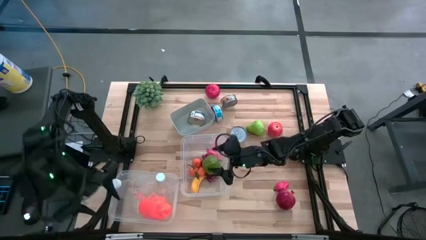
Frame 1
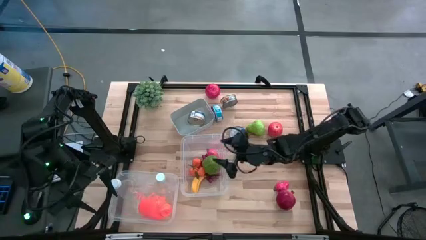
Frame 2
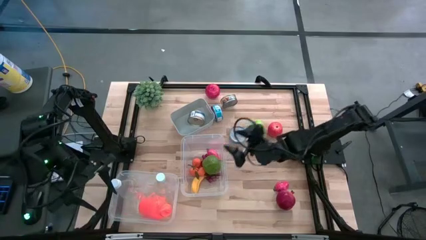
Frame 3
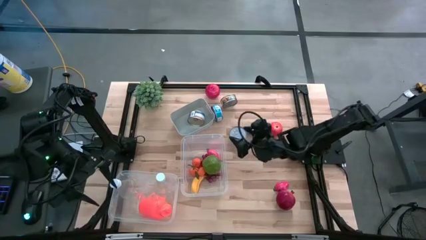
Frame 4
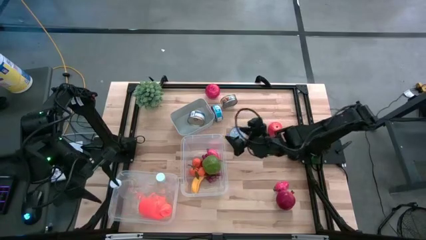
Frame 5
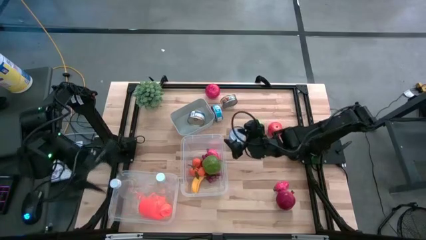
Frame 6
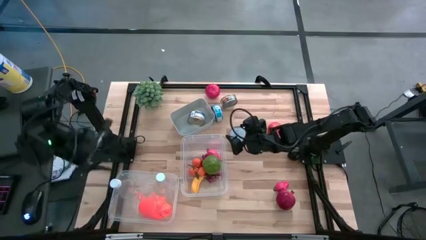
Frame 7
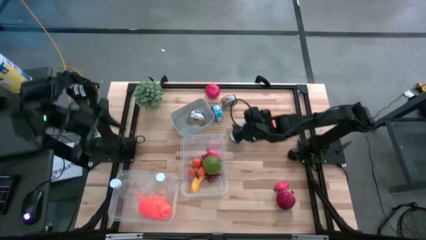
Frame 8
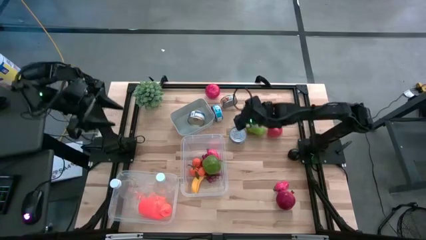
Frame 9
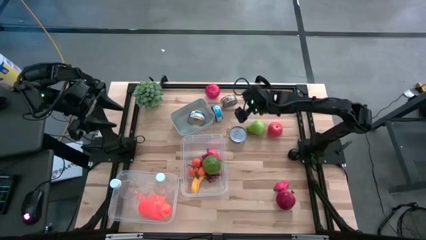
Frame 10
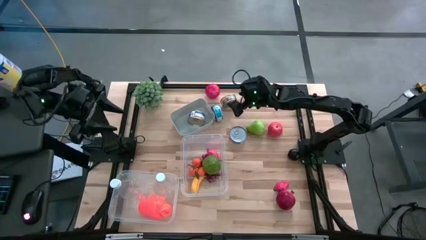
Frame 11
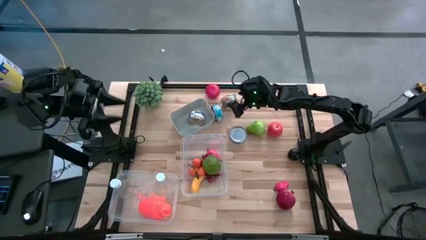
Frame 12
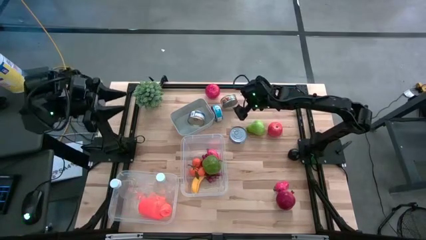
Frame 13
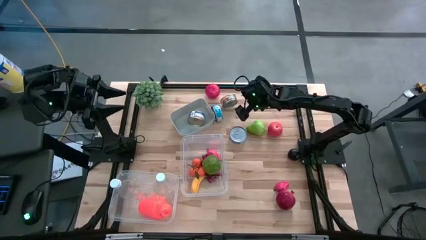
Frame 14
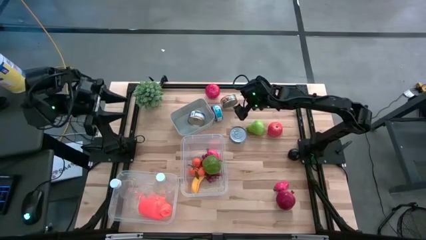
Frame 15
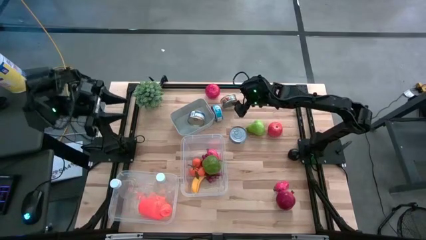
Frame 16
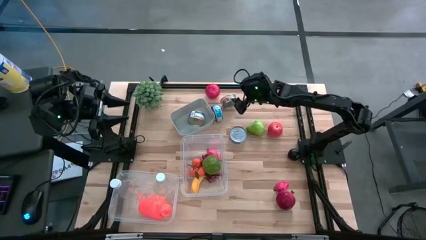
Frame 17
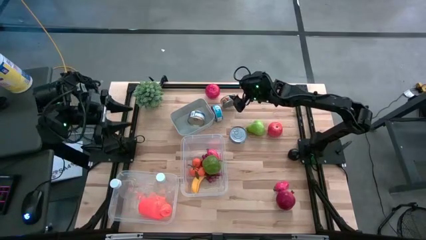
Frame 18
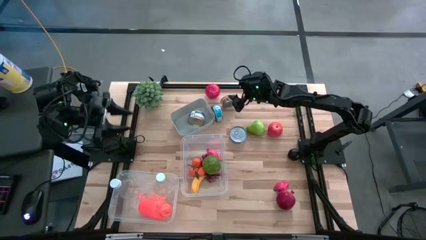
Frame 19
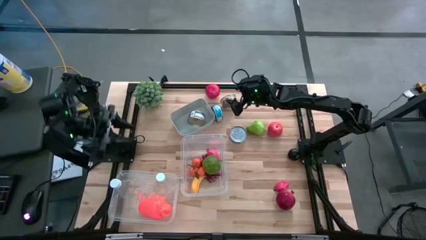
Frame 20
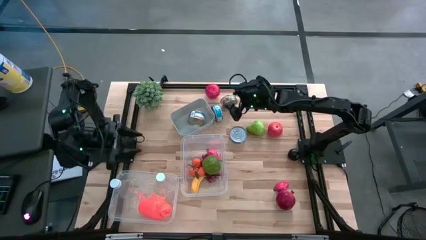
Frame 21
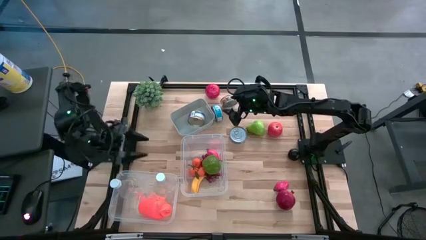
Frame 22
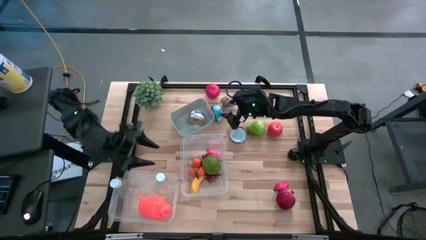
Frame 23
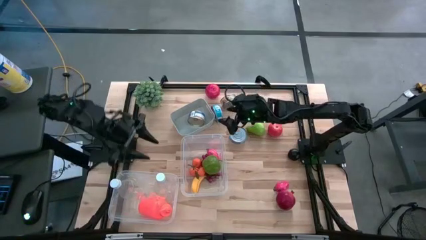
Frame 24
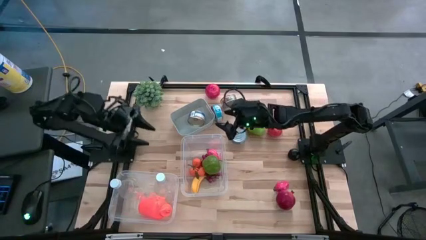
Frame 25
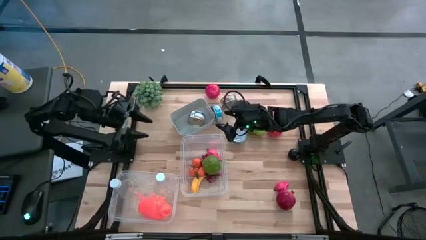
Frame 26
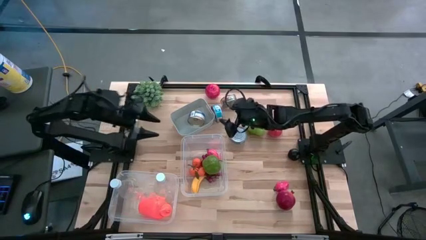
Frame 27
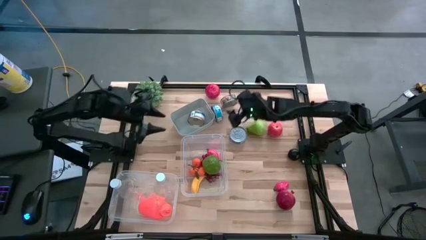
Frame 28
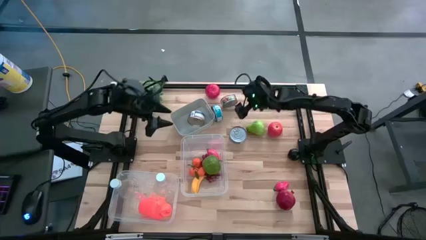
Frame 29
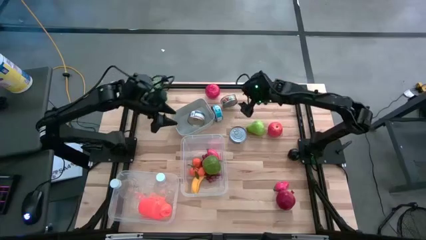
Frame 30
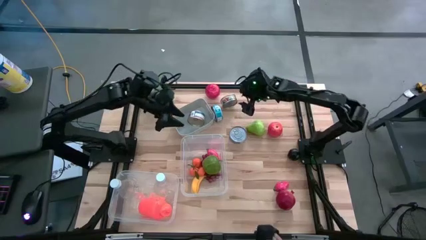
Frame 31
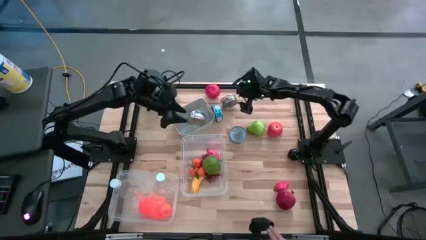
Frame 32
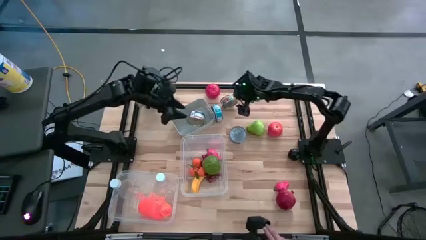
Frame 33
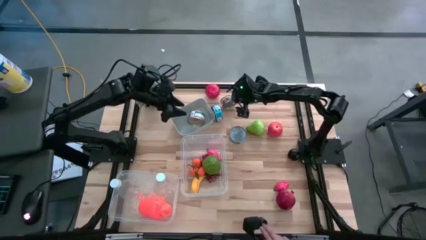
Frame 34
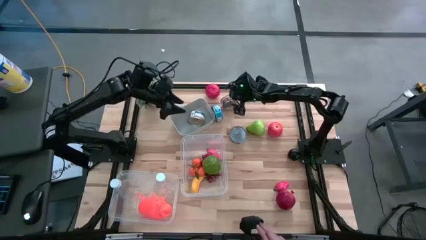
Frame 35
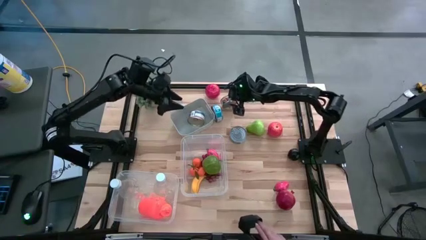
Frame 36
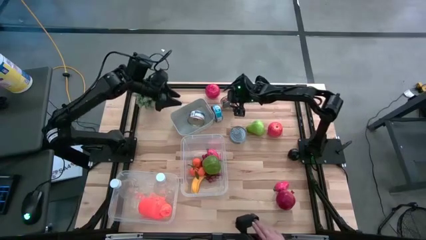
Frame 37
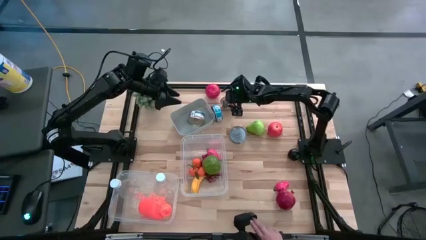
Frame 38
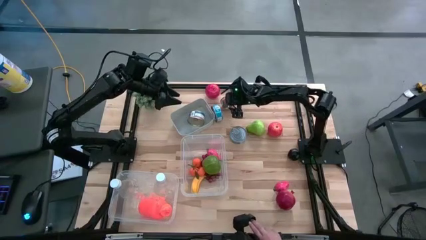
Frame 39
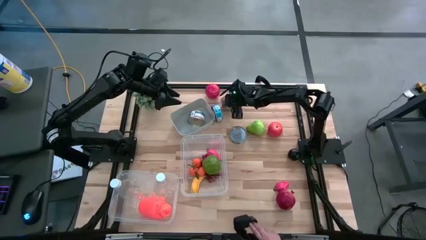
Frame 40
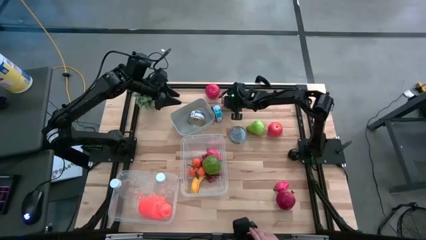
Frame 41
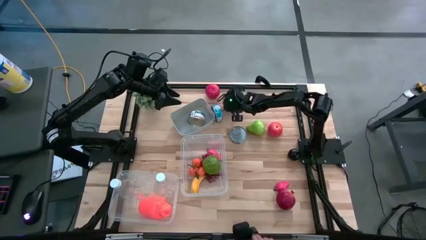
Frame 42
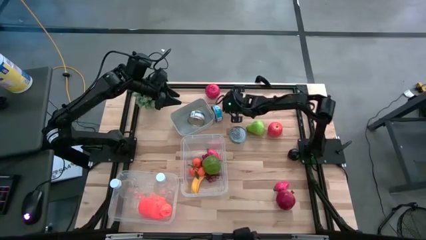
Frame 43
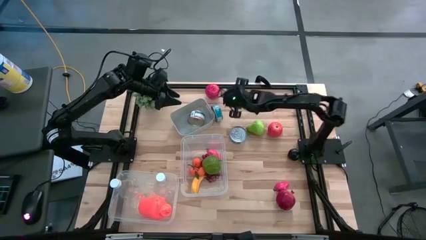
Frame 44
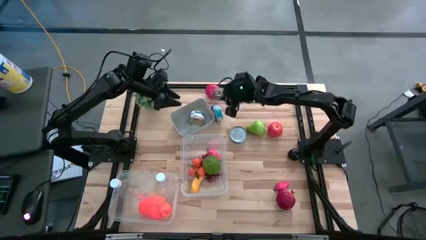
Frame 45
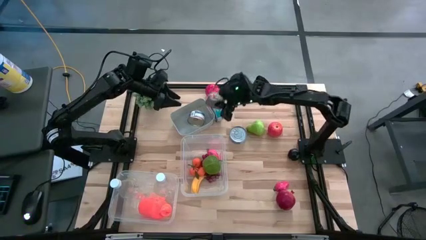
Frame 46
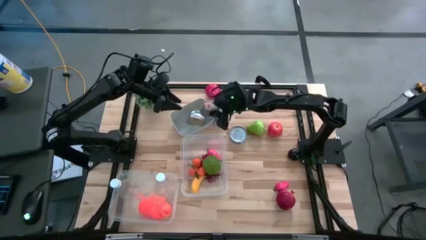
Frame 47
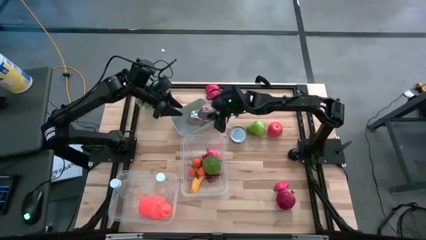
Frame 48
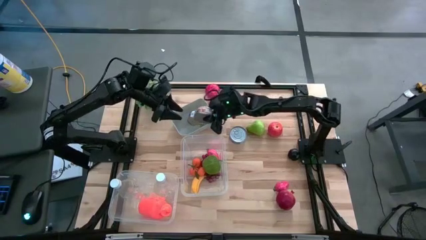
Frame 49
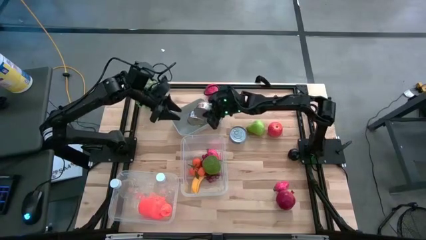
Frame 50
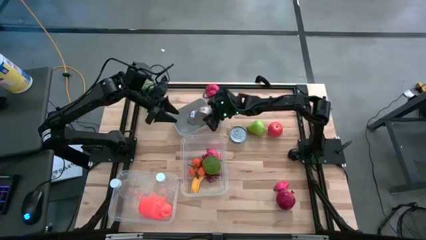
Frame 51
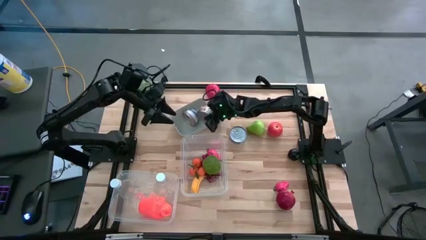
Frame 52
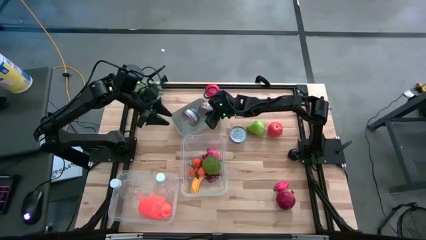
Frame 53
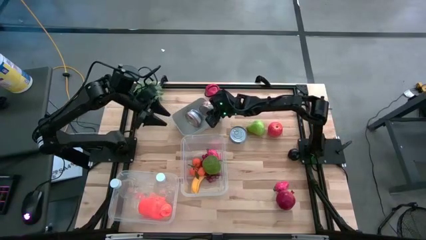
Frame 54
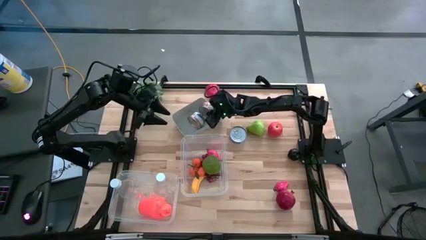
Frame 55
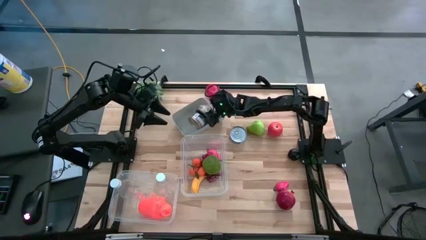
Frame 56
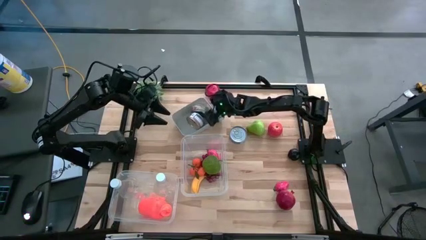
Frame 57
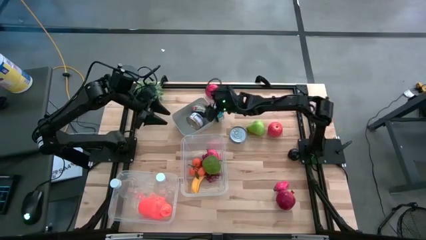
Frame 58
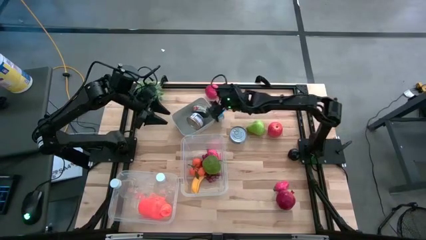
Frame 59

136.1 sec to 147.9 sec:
Task: Pick & Place Food Item
Put the top green tuna can into the gray bin

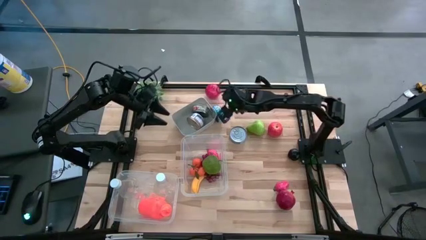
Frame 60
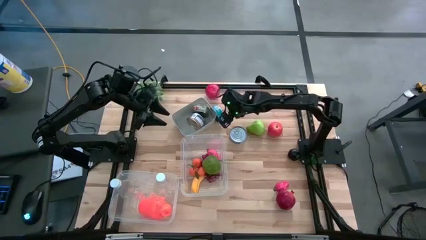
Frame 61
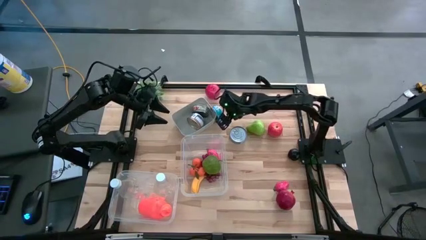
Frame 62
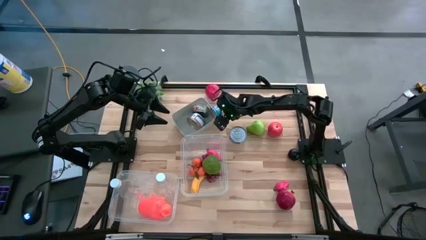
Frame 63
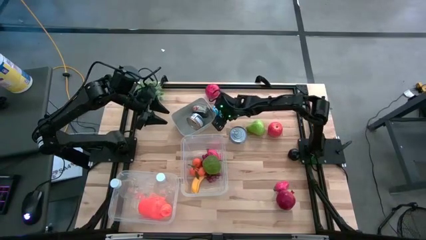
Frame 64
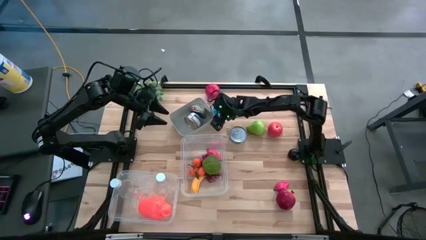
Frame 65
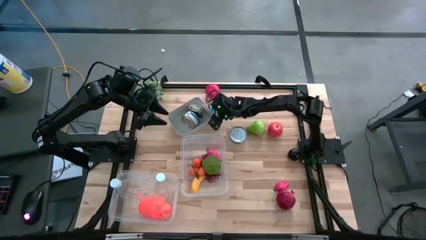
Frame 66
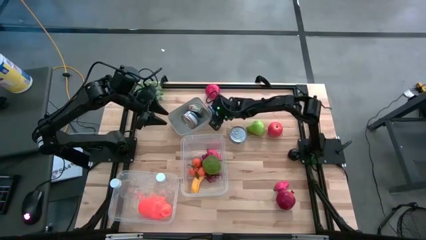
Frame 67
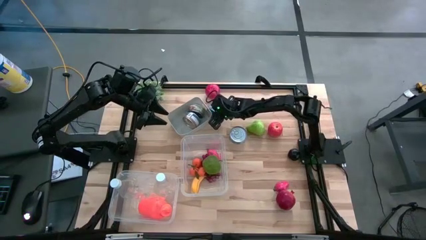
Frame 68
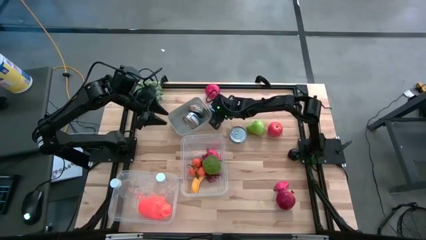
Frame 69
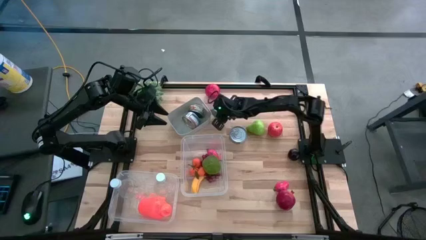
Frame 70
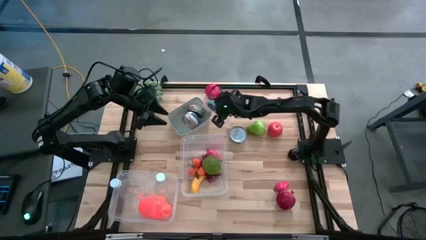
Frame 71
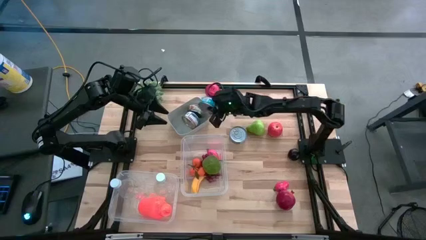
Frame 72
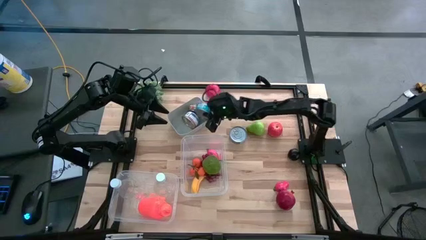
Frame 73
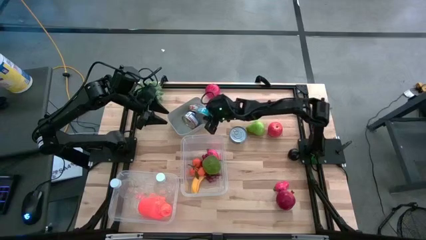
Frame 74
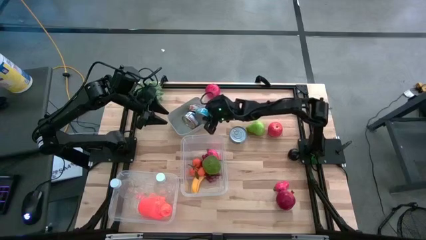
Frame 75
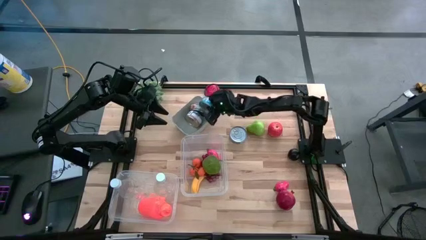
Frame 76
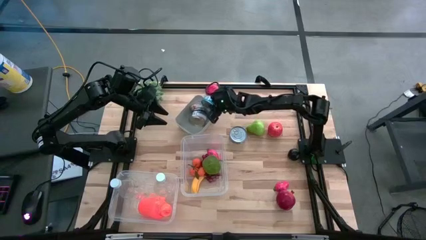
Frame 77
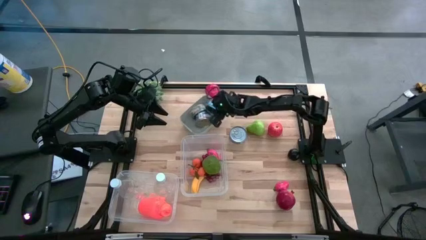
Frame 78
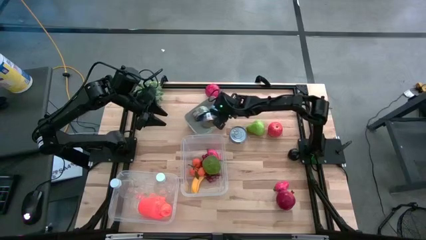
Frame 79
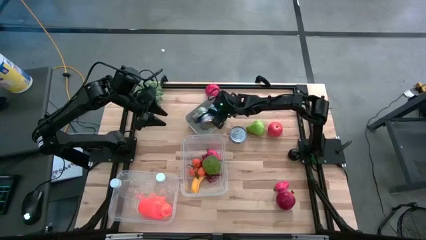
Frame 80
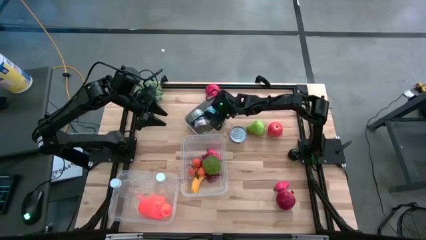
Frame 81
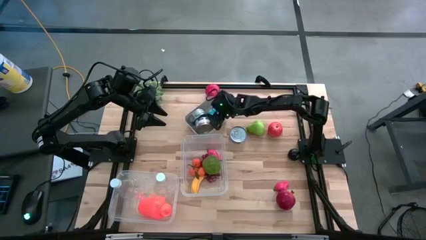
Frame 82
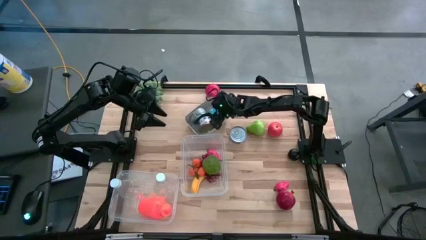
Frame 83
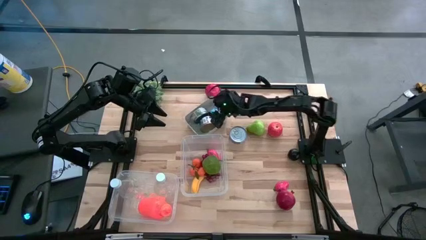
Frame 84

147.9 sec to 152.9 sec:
Put the blue tuna can into the gray bin
